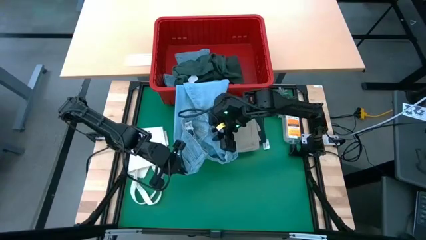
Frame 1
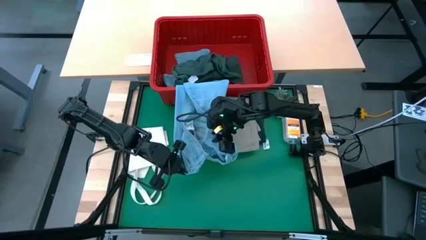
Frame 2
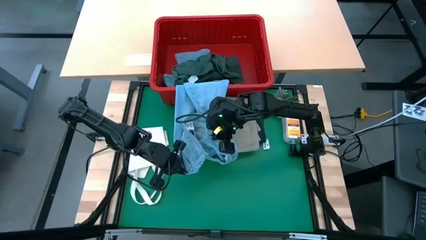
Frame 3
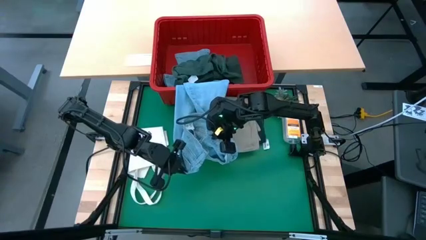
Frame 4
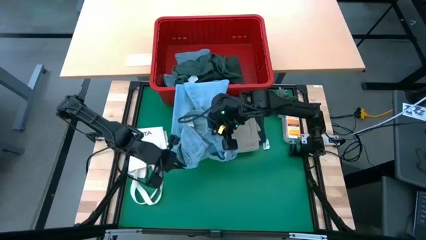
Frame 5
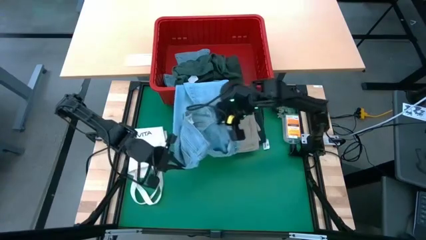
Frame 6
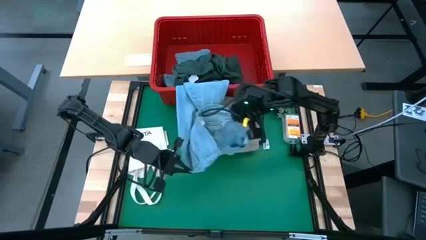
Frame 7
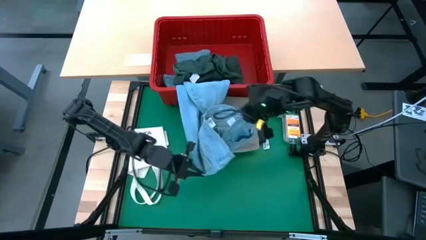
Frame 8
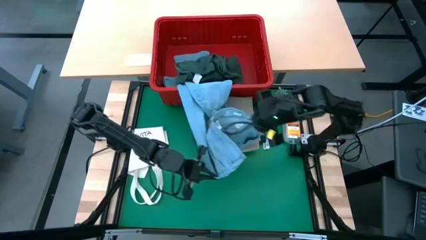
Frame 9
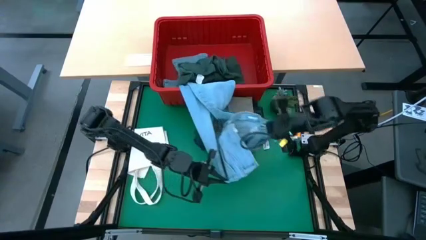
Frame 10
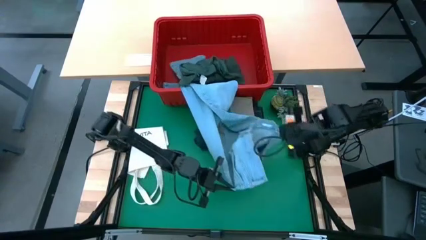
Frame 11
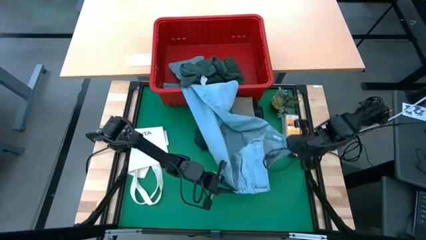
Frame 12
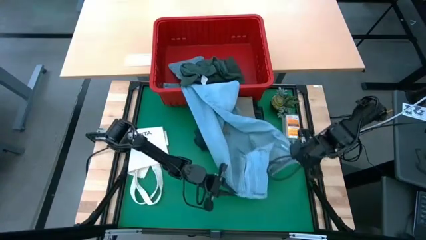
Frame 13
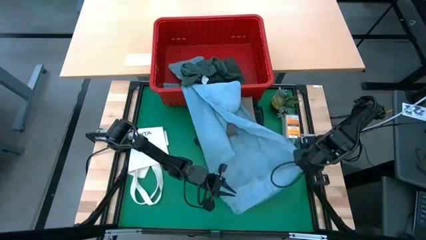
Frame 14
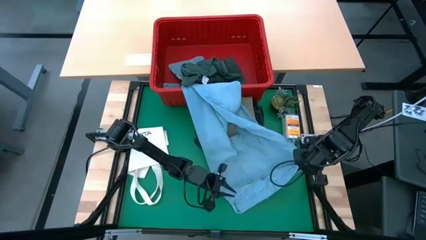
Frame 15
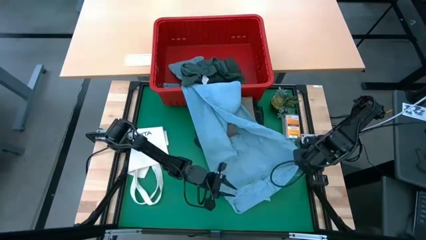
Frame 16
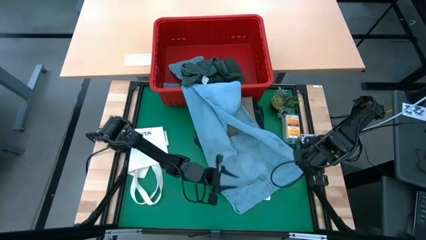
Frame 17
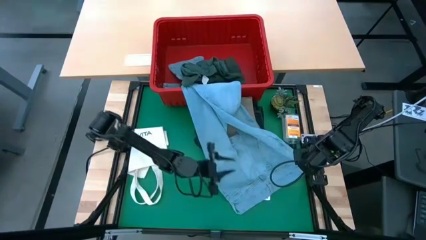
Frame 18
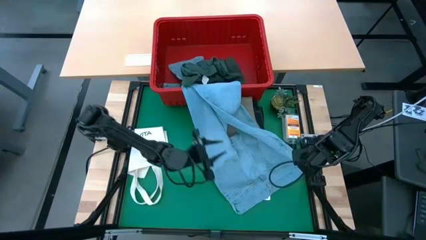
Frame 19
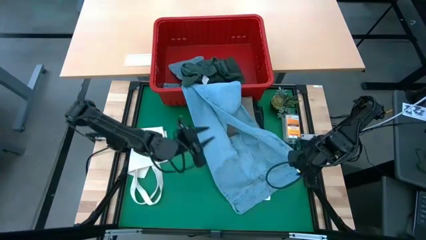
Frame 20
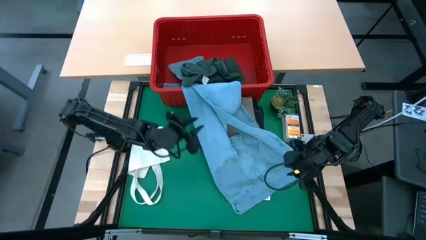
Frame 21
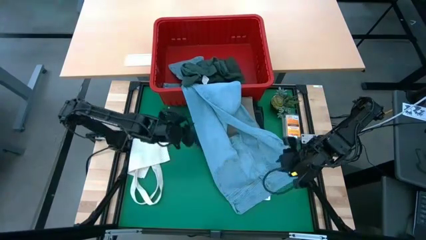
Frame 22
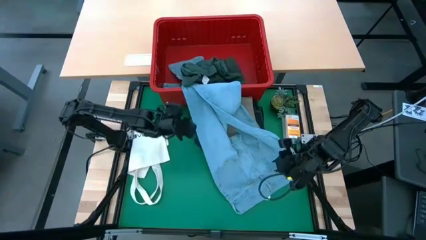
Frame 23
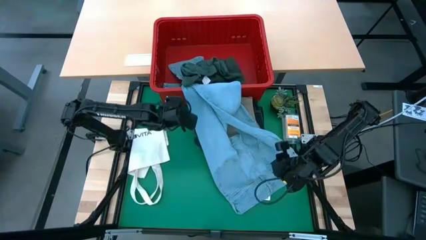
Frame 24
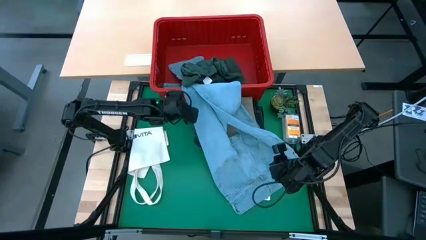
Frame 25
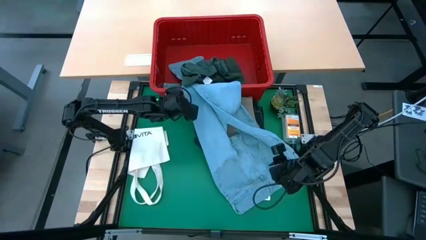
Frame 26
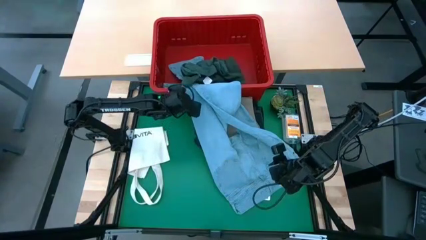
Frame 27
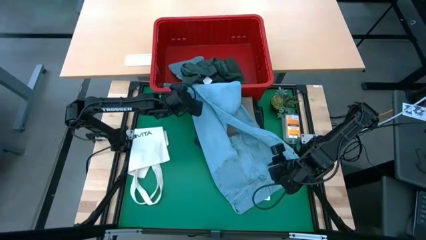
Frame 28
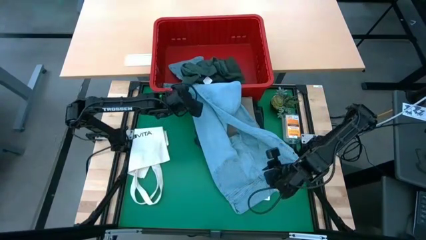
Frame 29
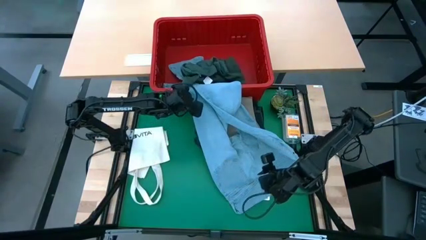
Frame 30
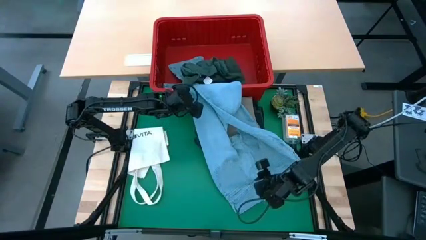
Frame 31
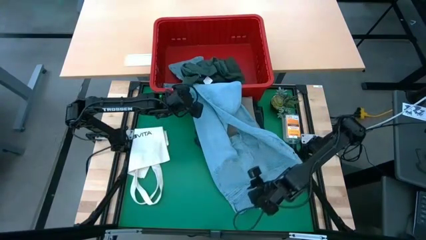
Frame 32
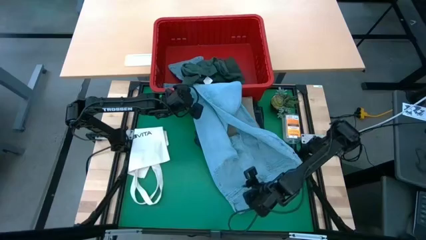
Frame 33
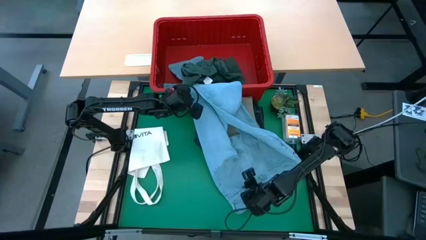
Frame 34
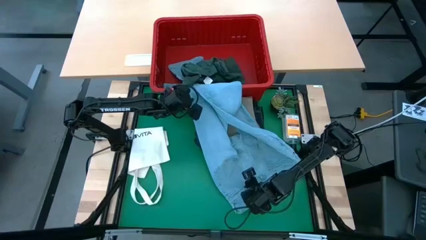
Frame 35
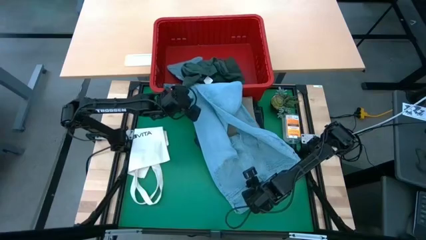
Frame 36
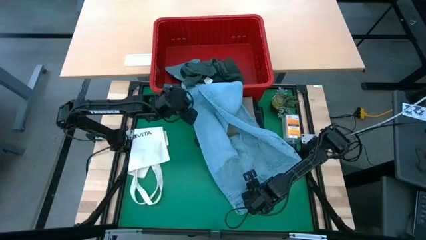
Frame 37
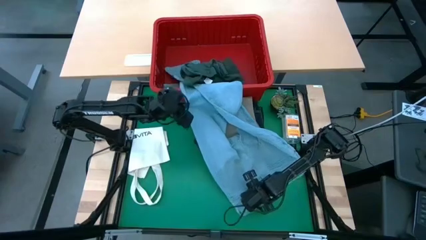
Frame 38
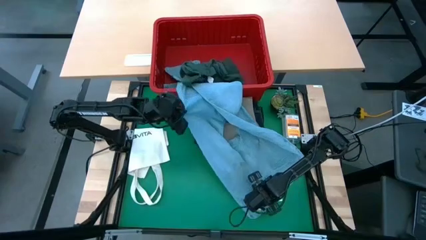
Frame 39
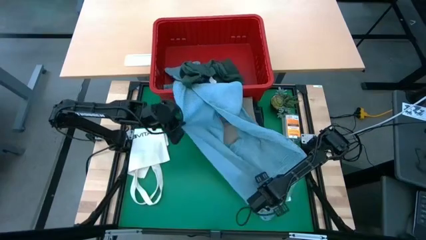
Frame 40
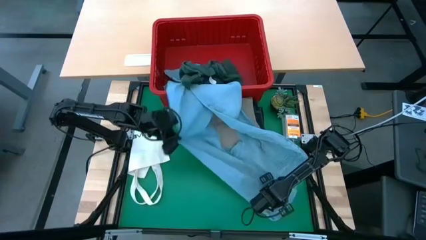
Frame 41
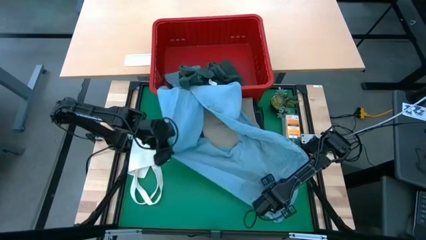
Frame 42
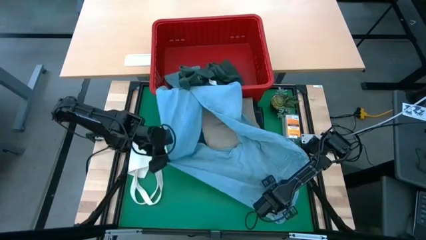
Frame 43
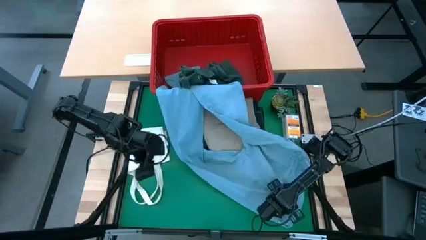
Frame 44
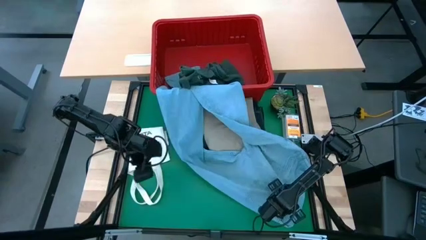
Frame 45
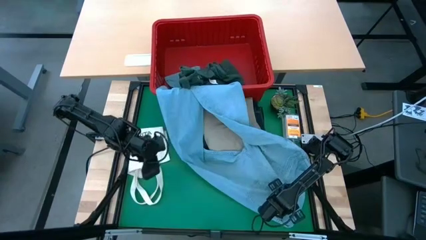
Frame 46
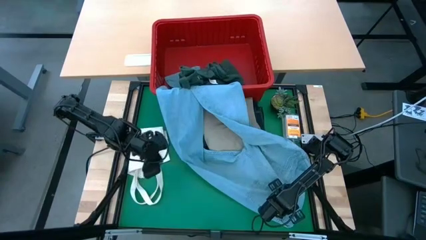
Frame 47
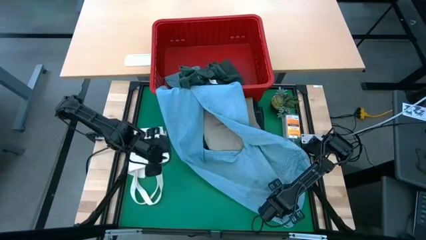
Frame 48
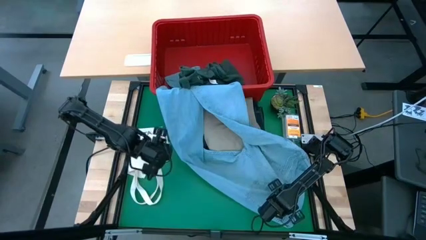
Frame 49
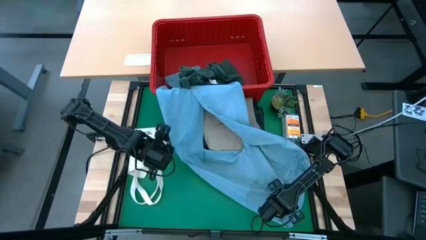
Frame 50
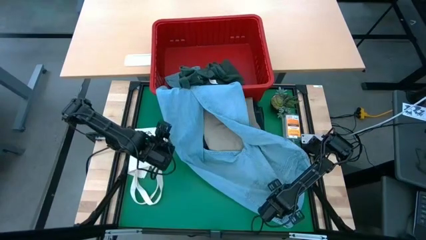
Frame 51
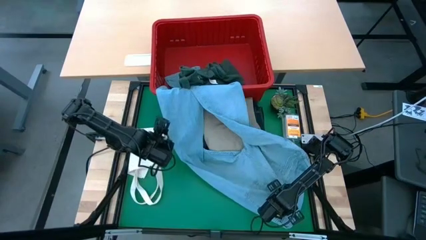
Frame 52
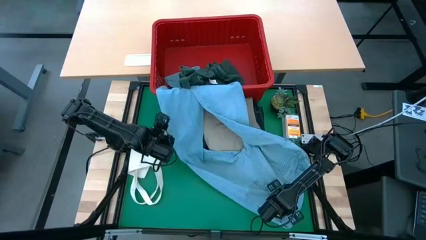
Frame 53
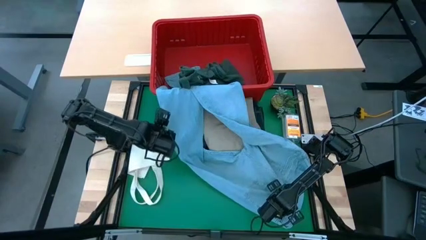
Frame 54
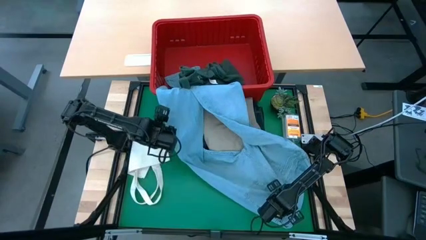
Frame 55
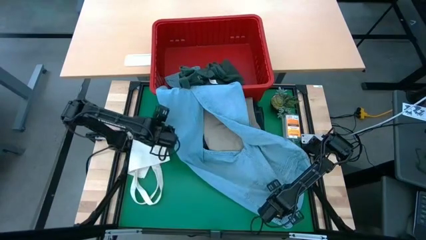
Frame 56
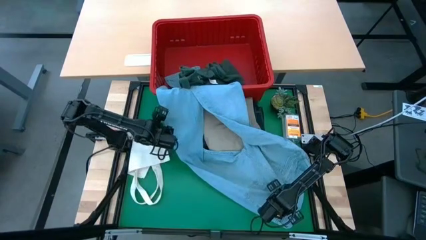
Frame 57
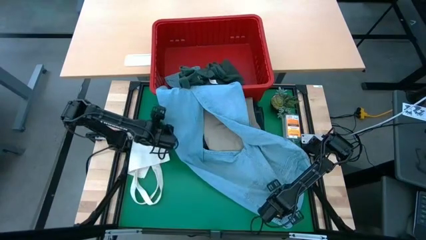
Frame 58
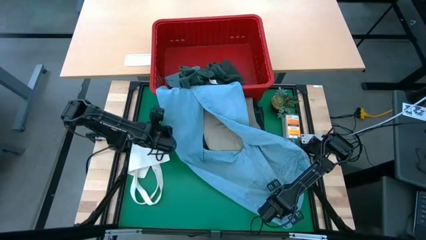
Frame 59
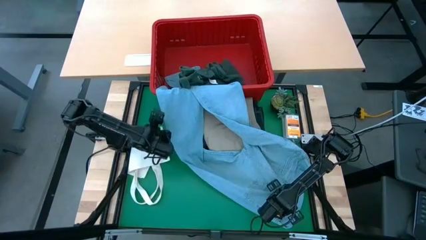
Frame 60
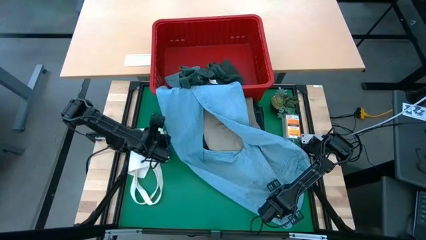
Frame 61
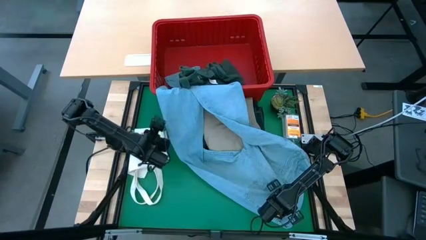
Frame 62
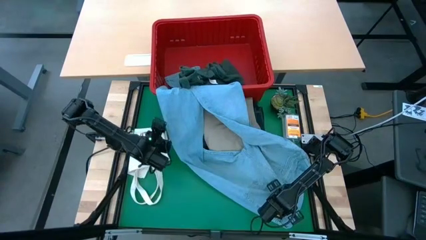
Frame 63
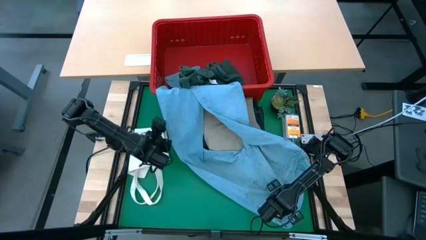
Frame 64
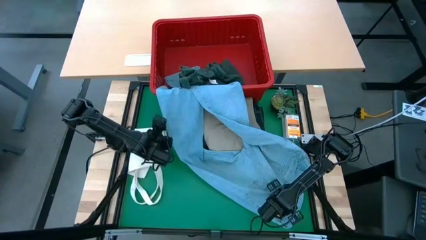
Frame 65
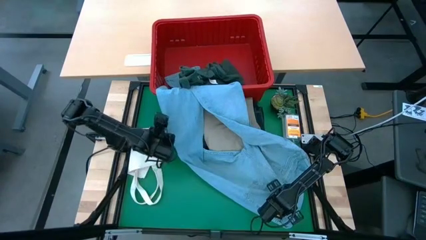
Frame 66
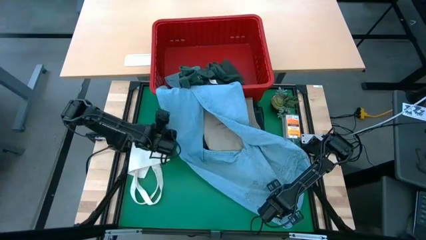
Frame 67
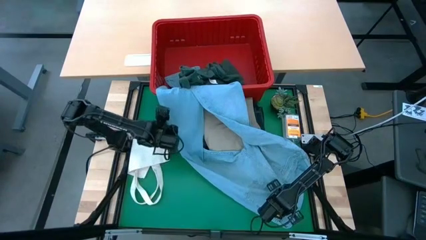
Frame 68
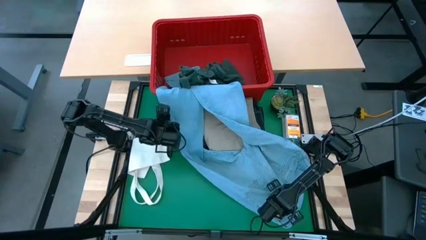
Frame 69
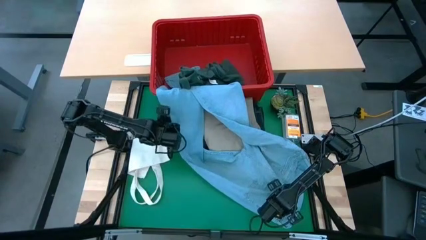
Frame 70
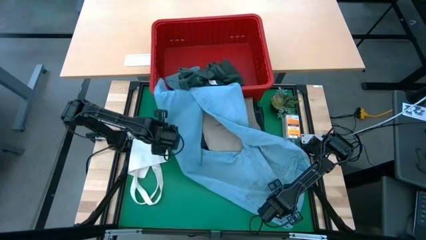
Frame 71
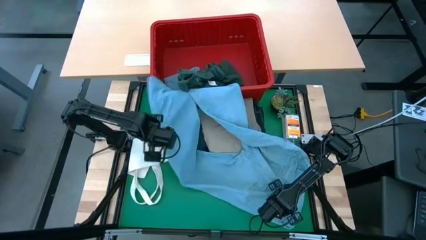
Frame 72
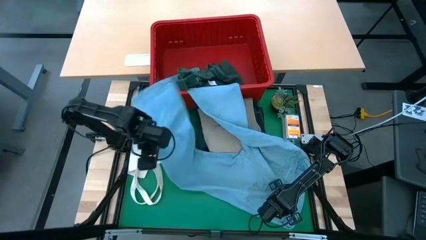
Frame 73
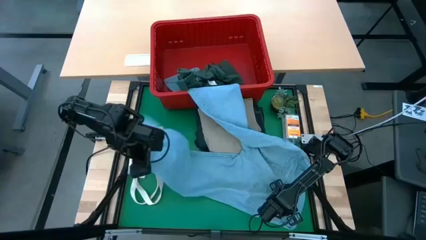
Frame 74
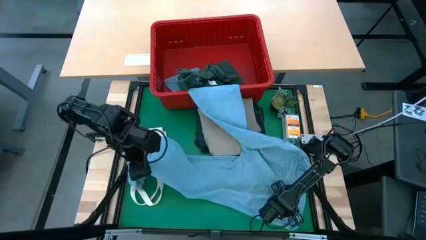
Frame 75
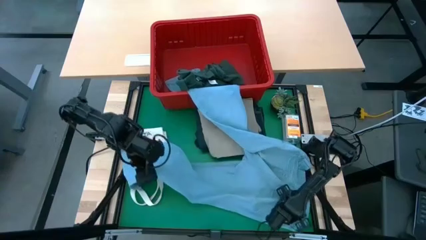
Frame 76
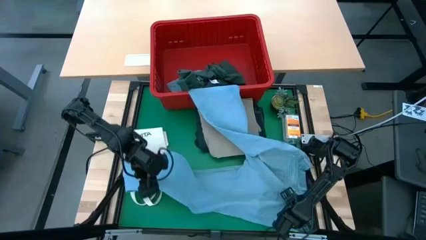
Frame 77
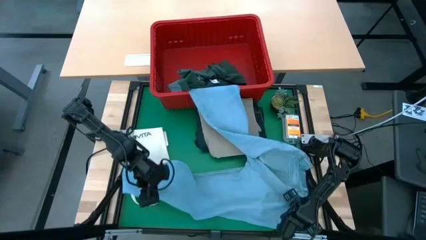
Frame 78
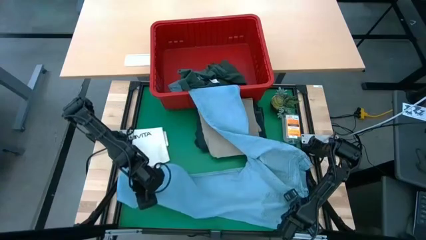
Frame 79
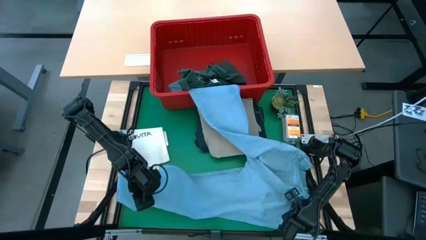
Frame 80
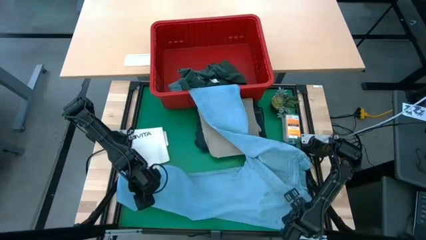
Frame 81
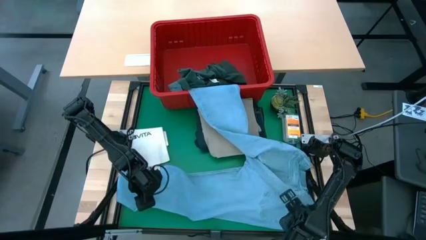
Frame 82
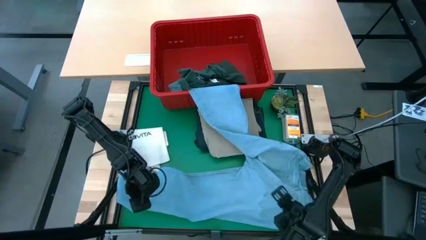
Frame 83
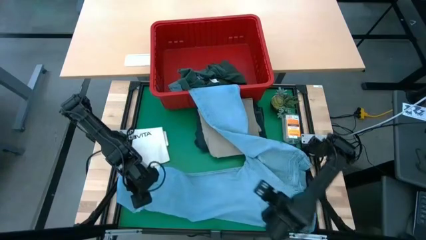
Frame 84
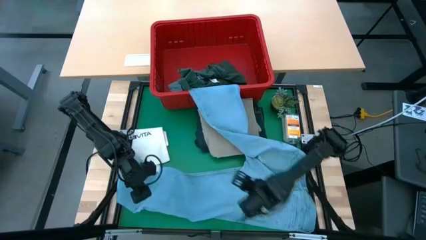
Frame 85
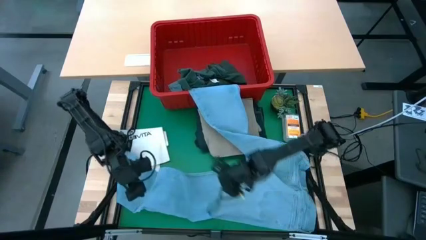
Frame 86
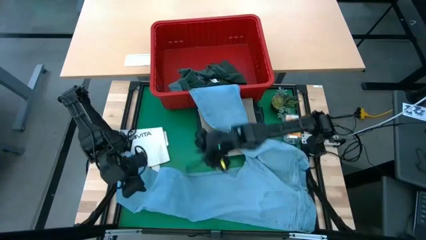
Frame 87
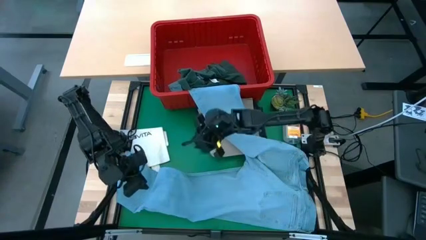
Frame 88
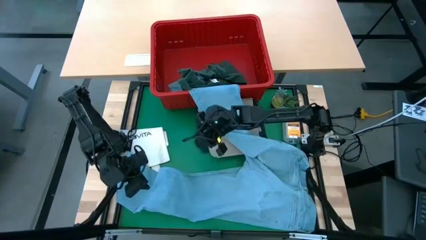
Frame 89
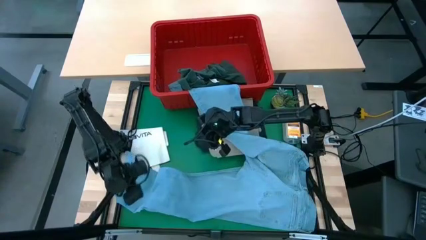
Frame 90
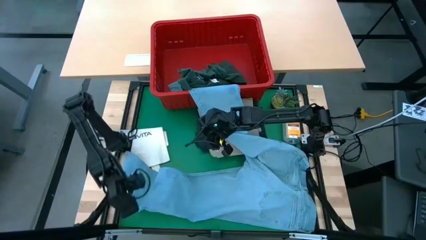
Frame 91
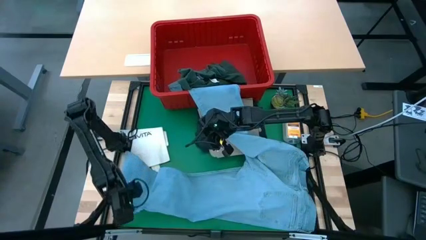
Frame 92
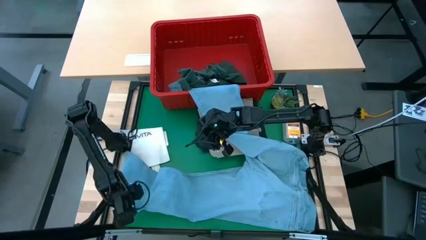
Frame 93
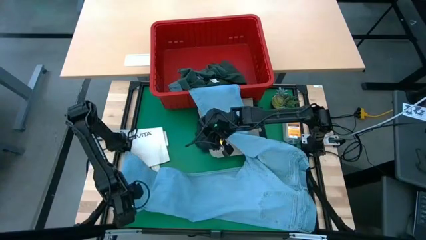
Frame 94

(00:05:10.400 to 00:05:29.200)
Task: Fold laundry
Remove the blue pants from the laundry bin
